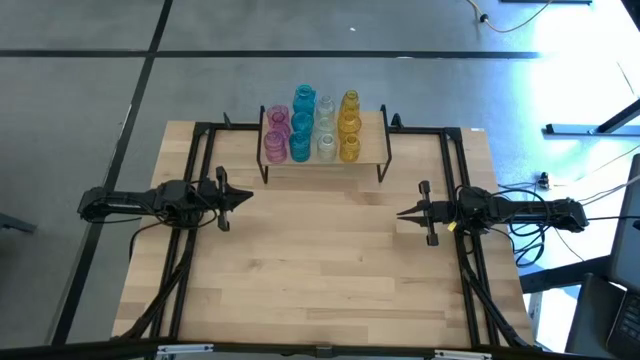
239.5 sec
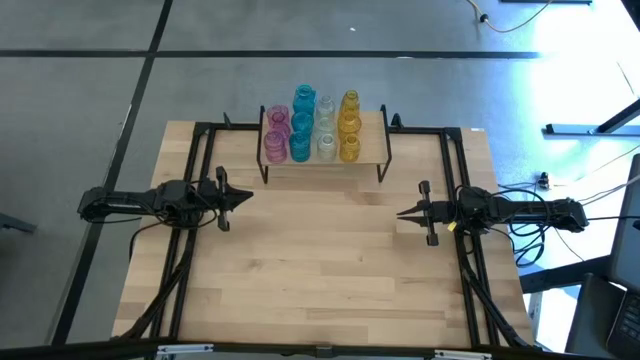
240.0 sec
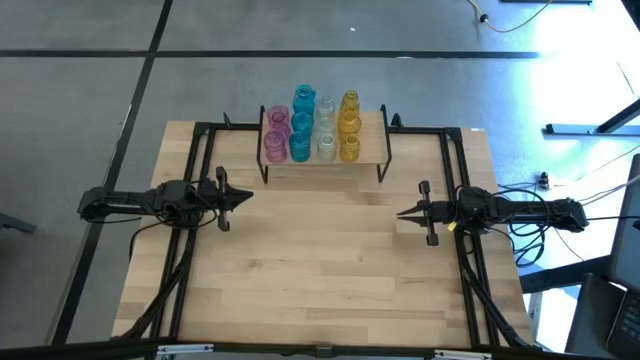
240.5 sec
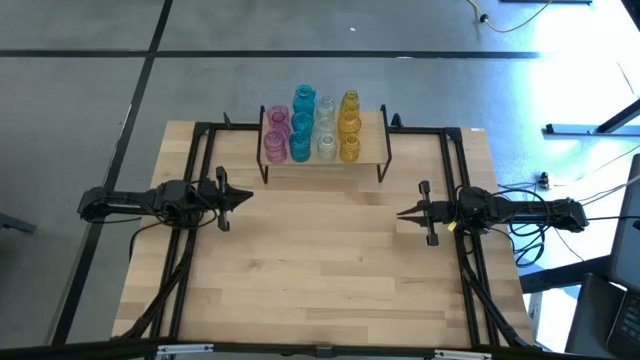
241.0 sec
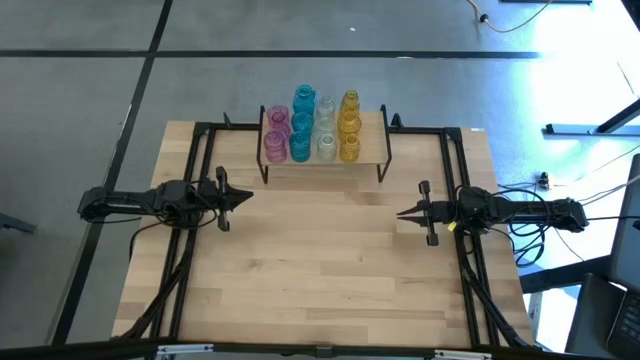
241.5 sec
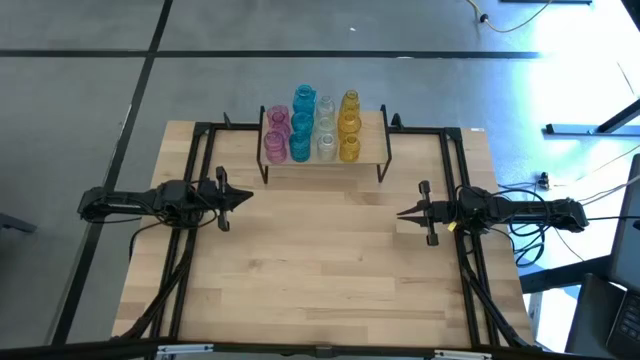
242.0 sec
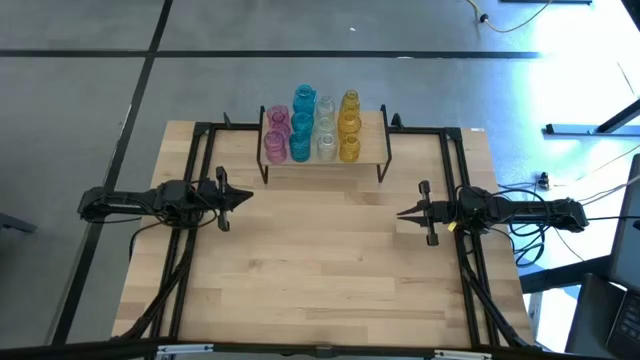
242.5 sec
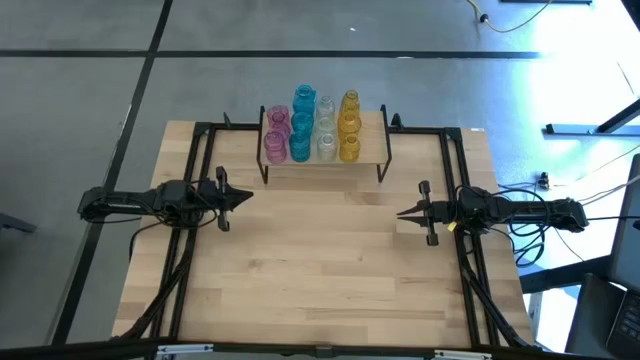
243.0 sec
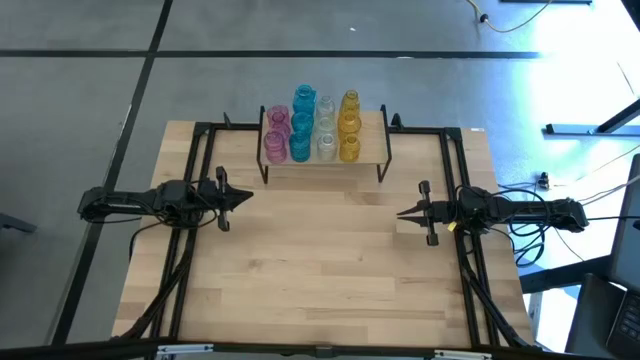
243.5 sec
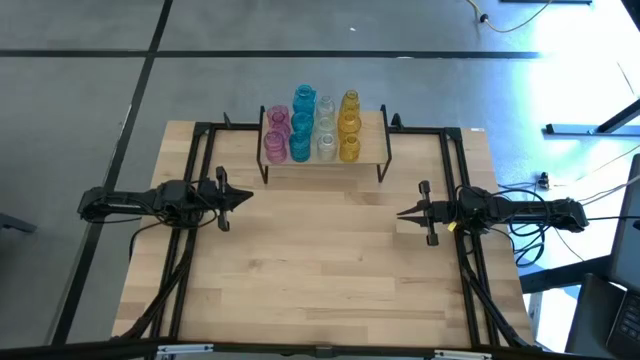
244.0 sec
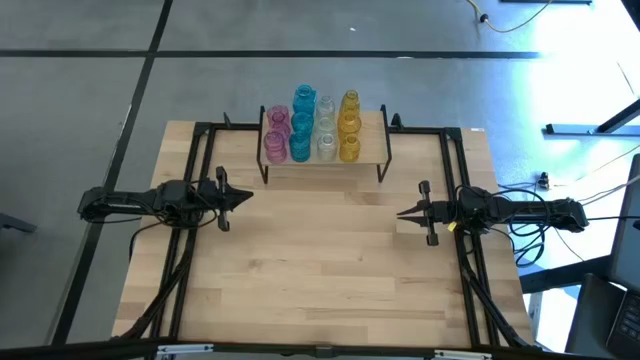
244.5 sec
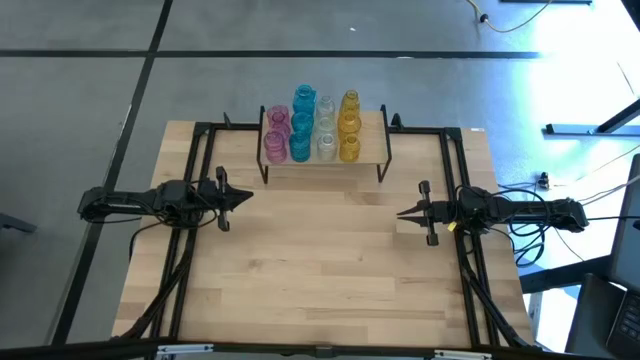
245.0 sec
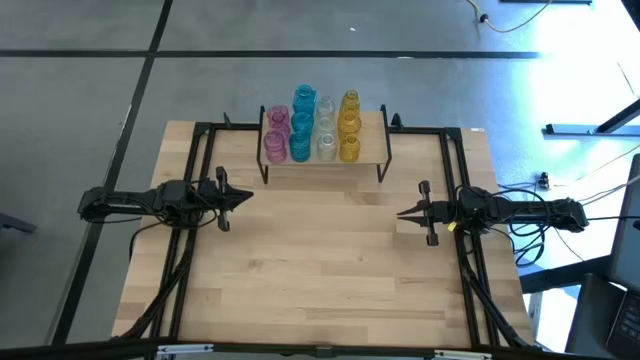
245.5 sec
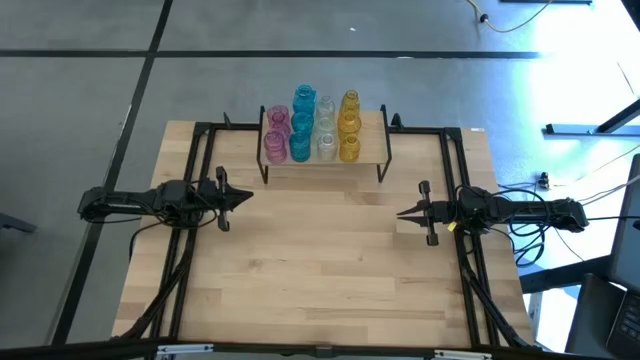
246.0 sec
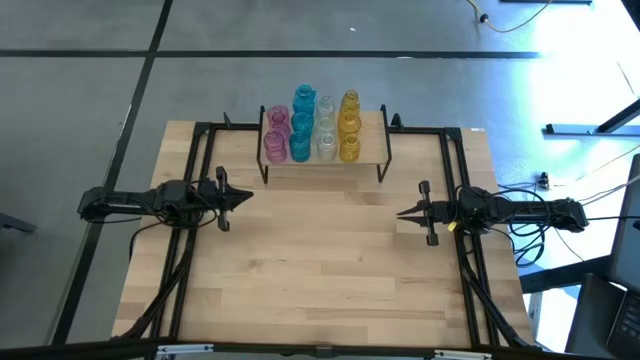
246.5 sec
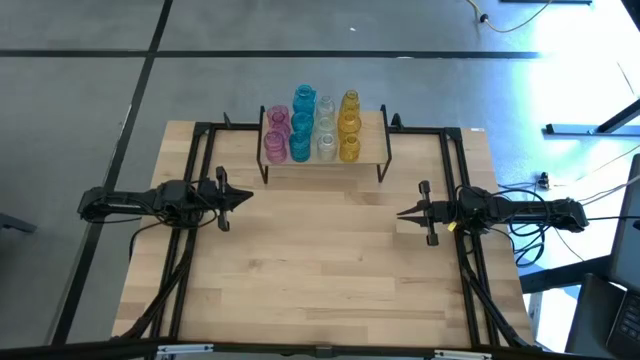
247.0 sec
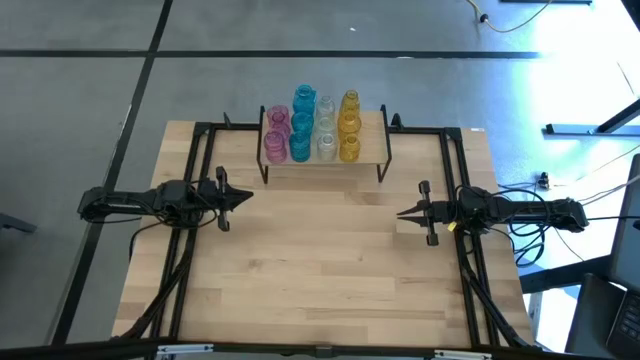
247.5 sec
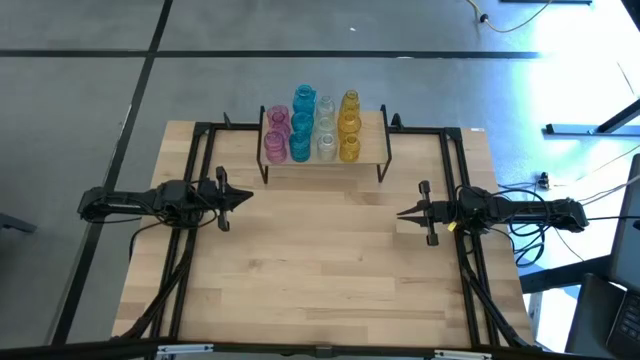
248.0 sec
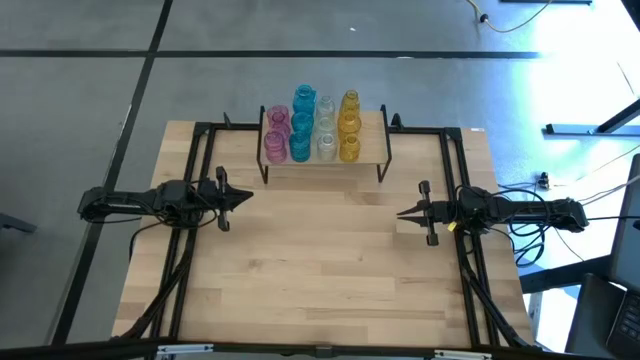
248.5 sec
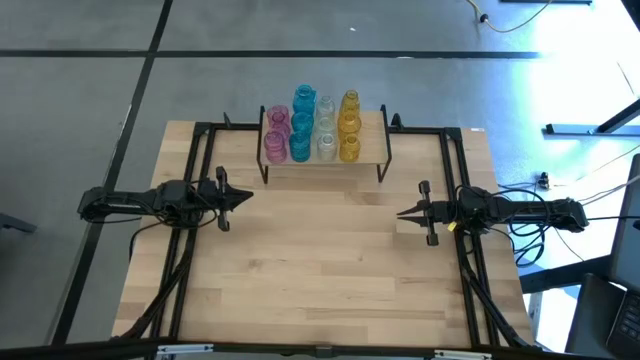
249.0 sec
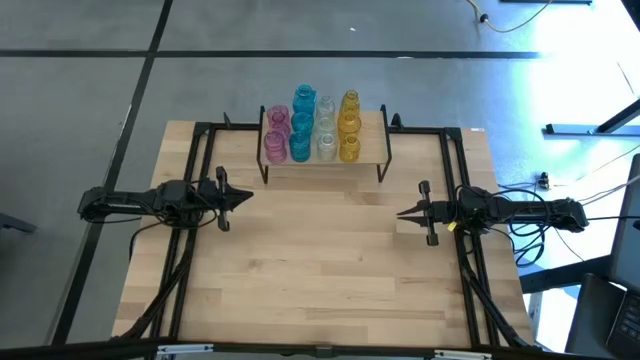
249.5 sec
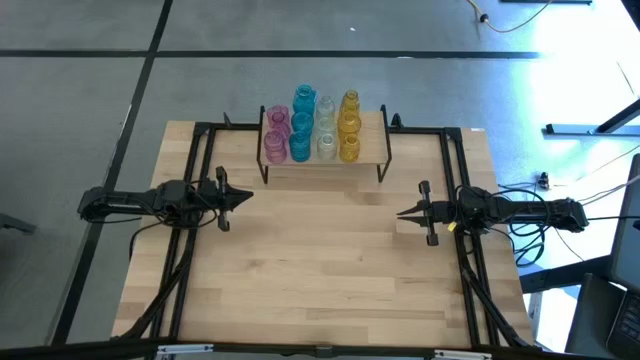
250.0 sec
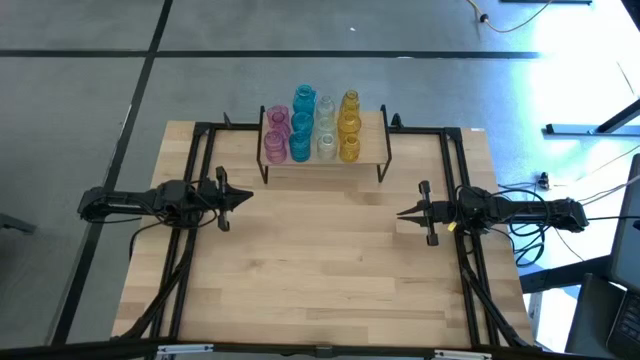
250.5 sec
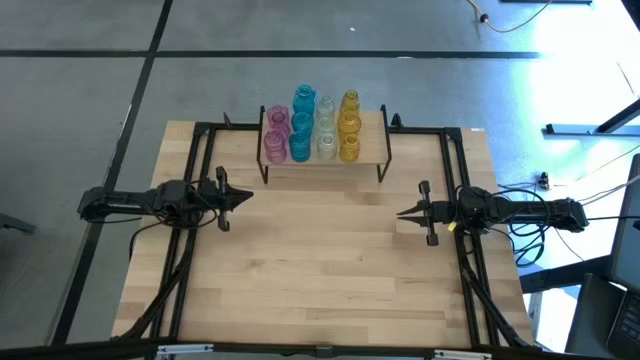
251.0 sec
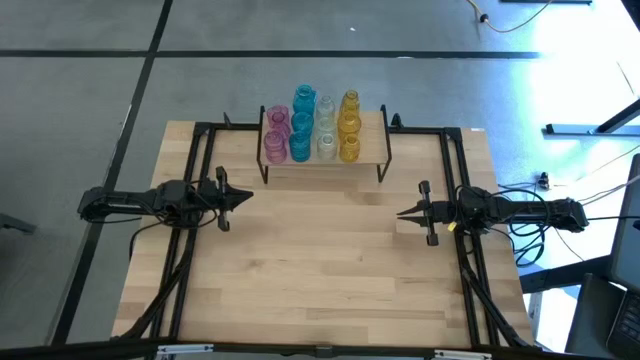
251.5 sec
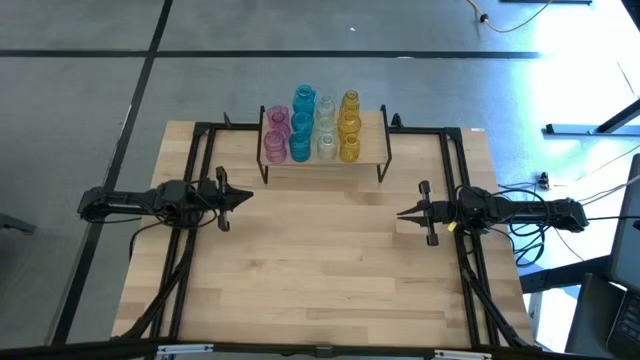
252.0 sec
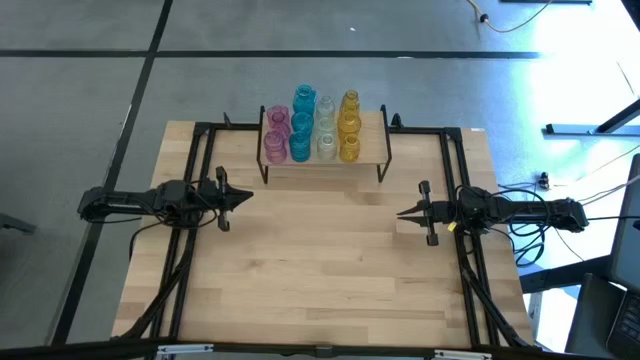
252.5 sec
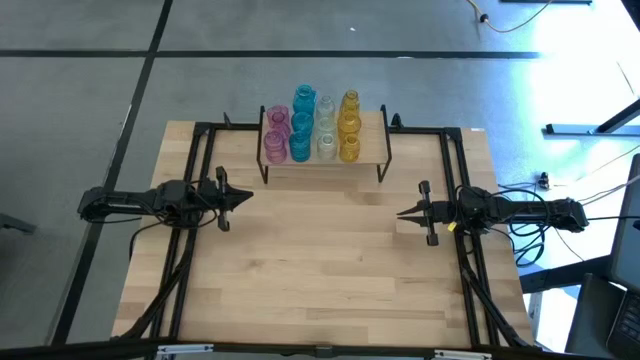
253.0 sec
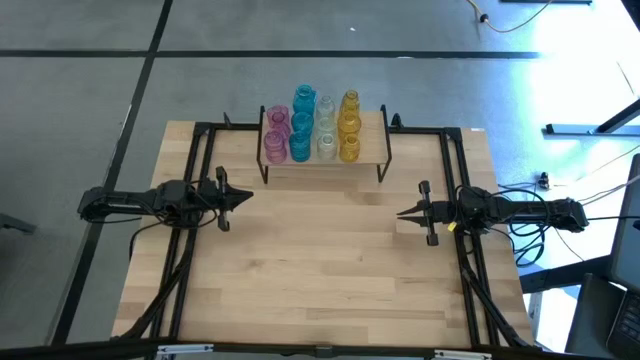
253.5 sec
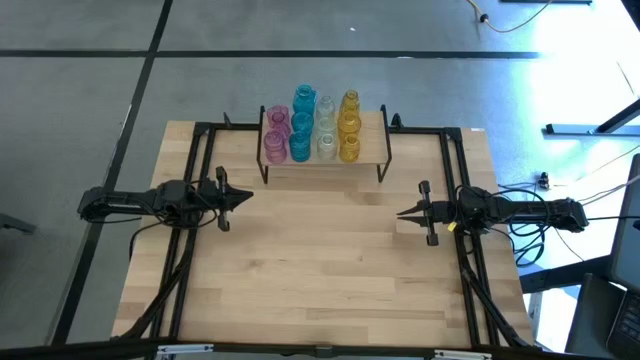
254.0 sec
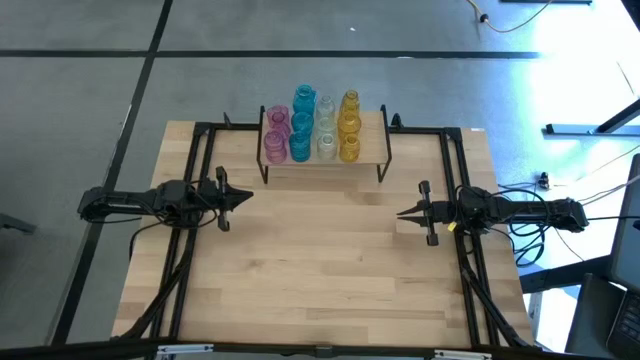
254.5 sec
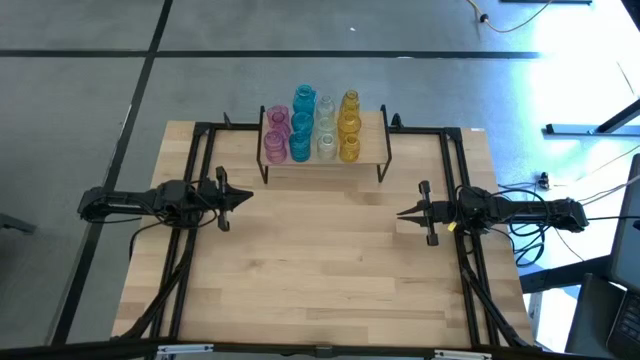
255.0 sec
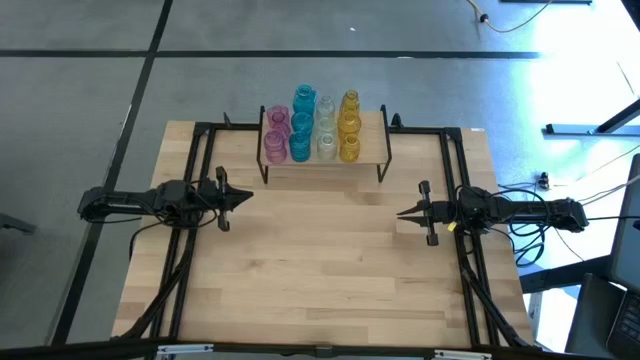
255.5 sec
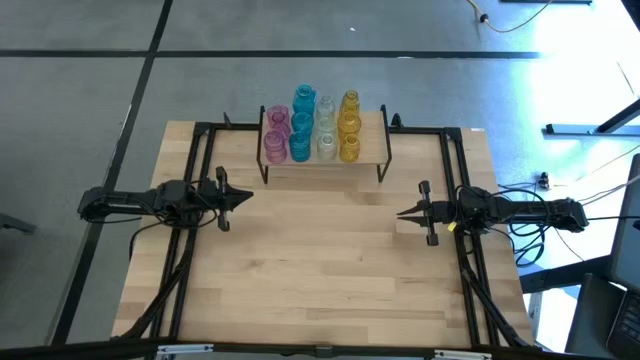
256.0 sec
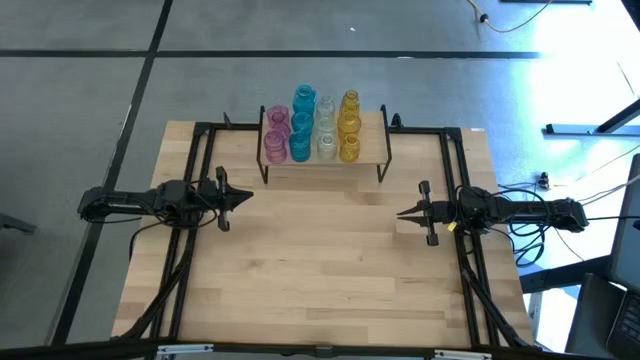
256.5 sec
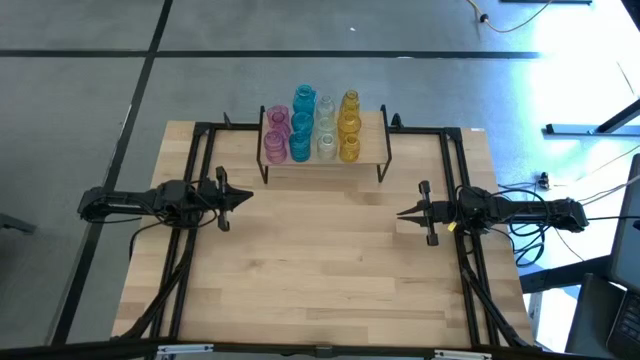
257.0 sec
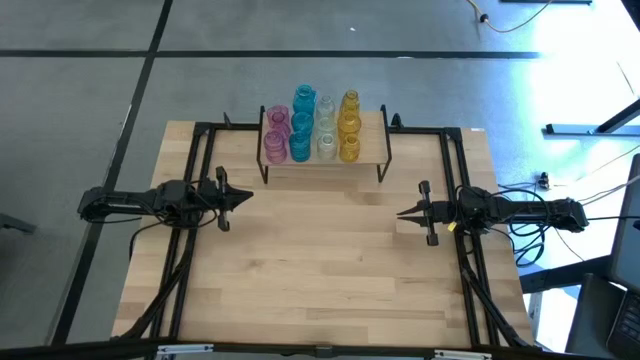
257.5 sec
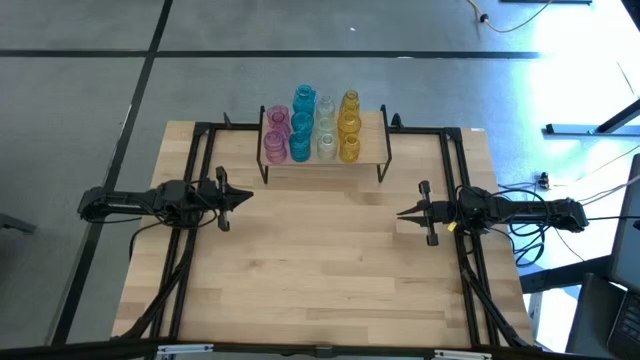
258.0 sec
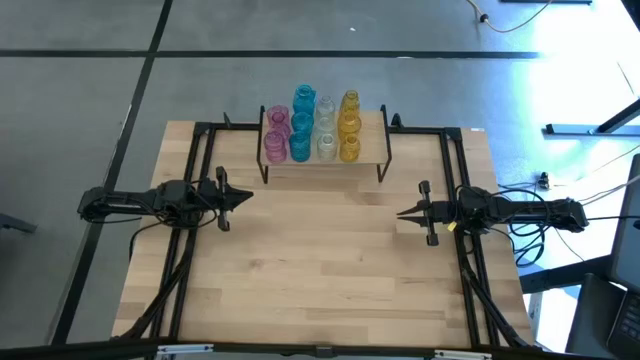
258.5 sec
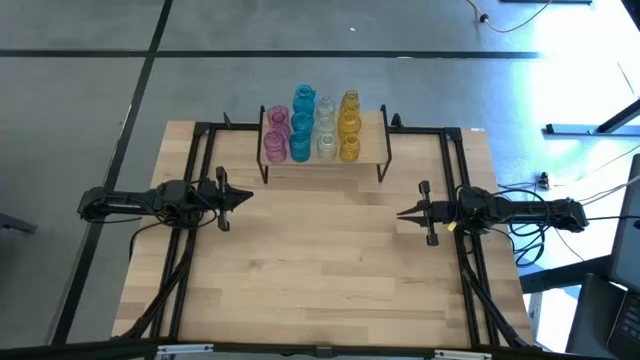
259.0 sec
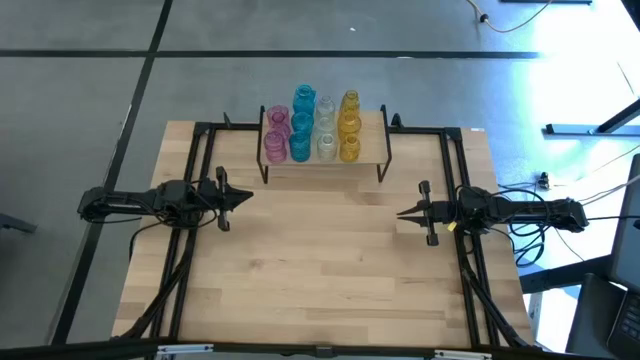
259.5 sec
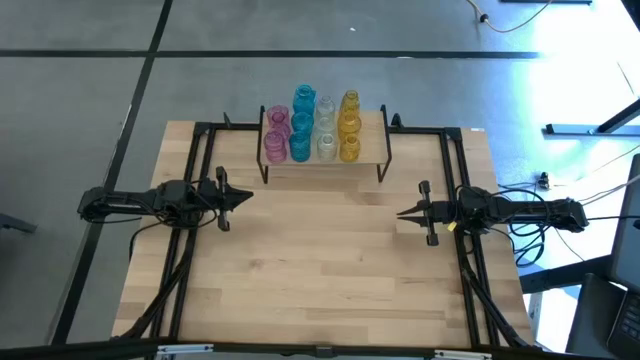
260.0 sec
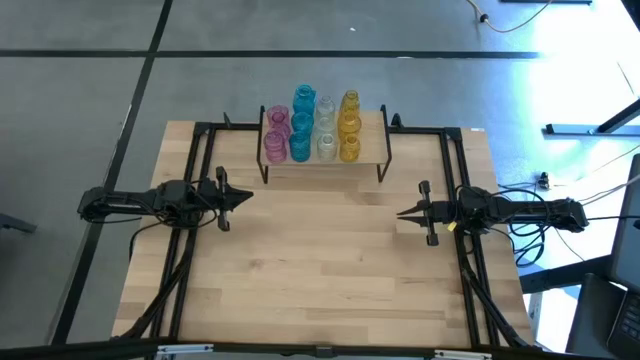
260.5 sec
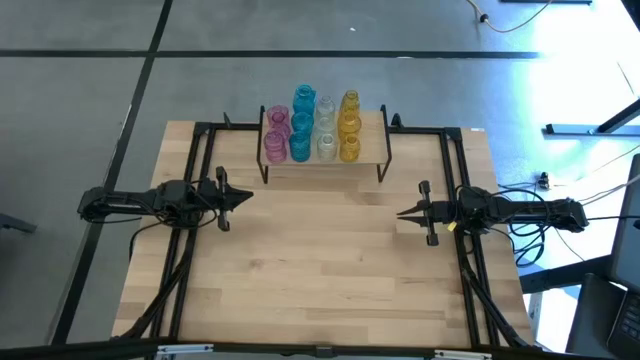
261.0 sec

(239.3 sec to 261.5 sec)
Task: sort vases onto shelf
Return to Home Position
